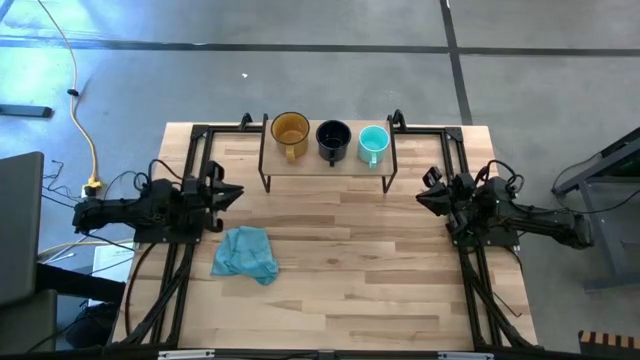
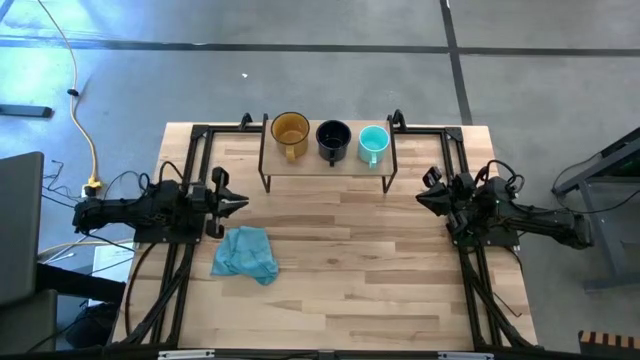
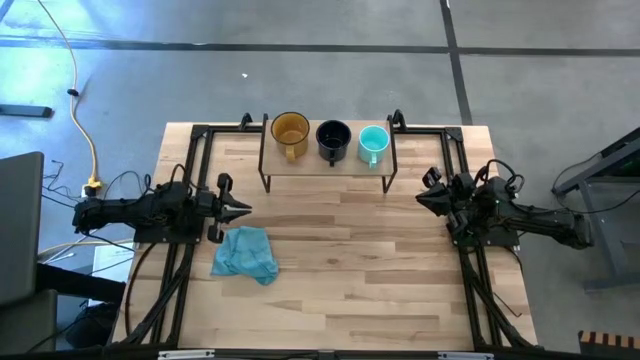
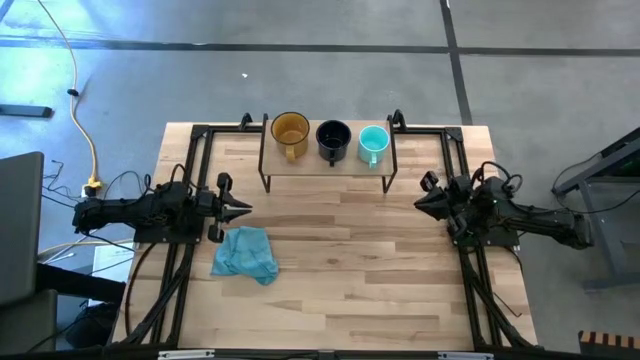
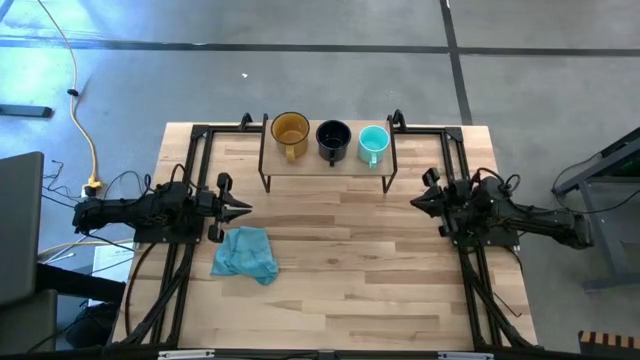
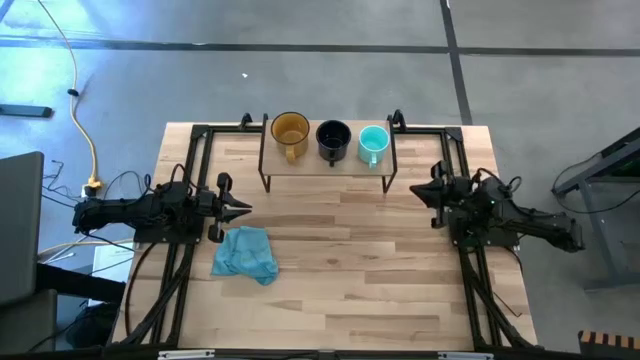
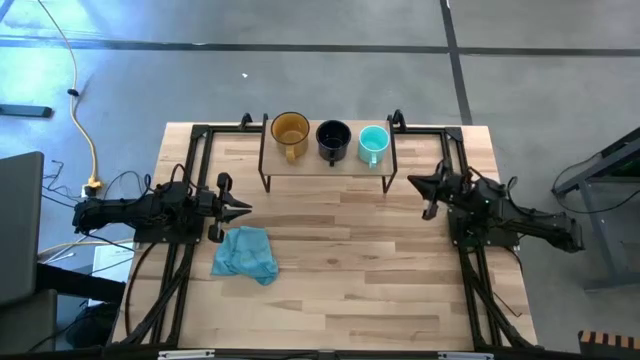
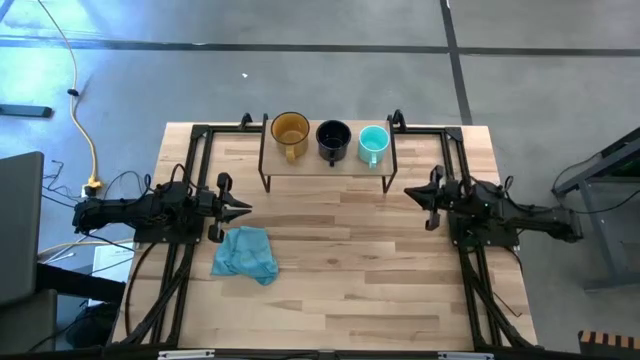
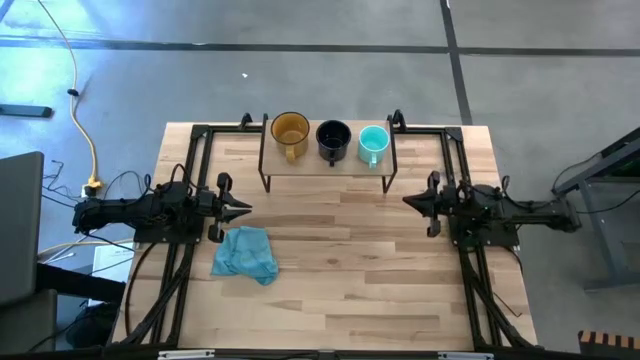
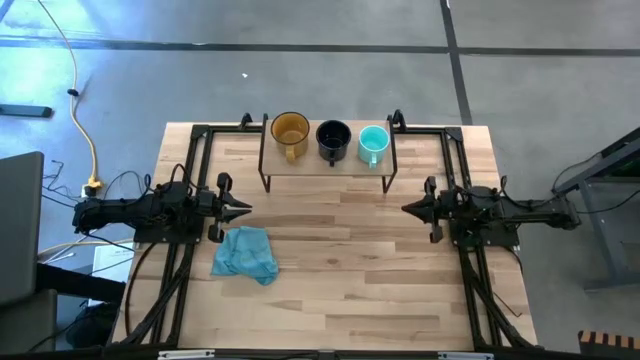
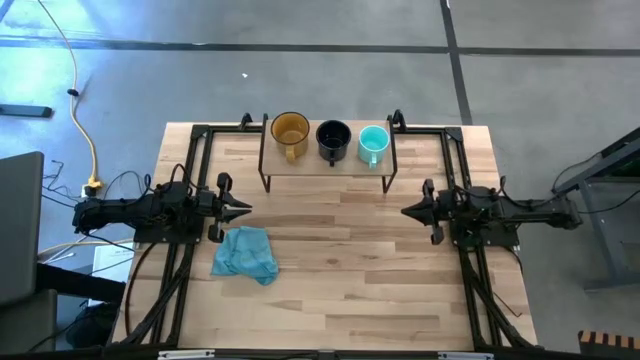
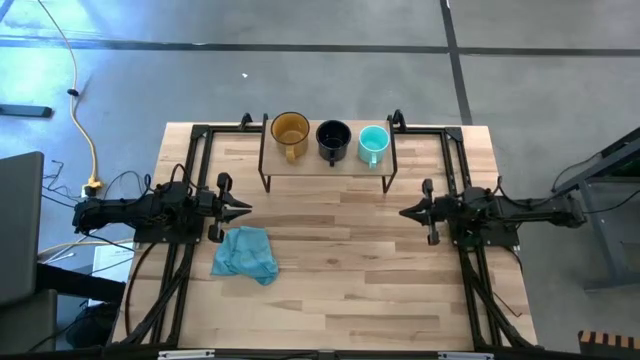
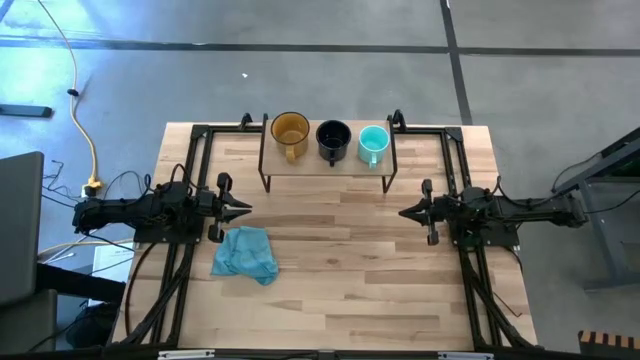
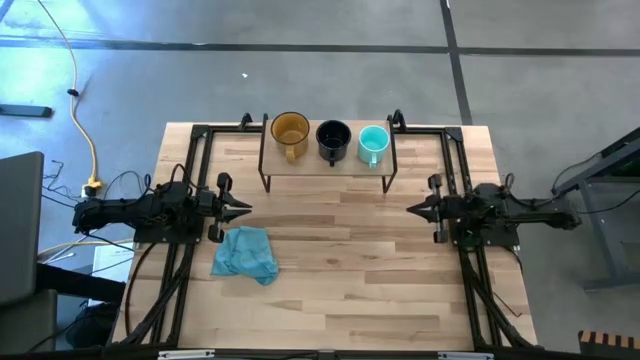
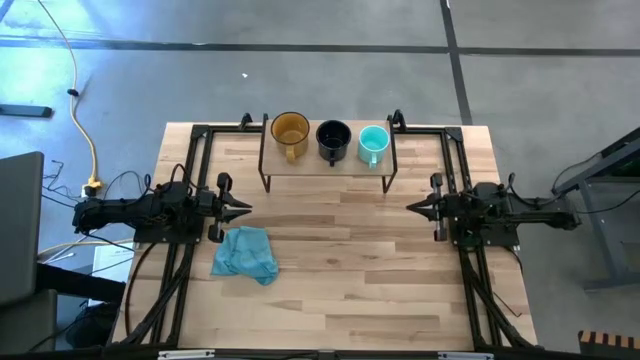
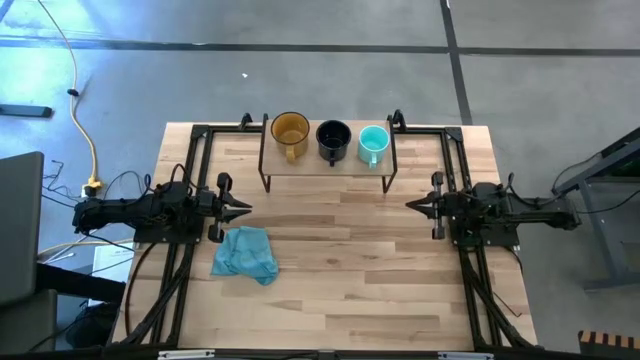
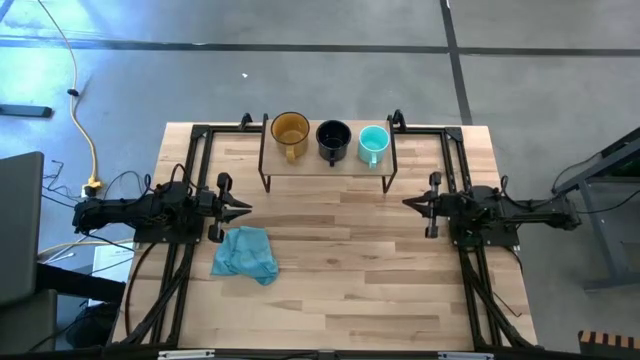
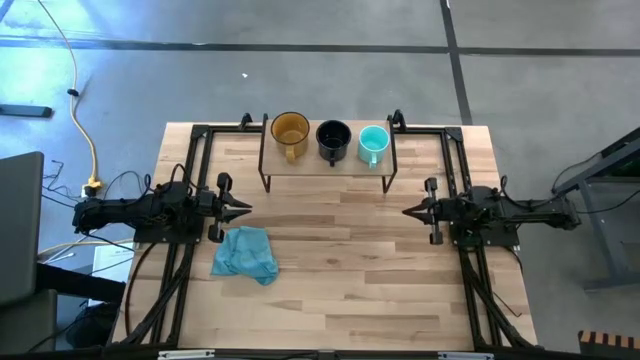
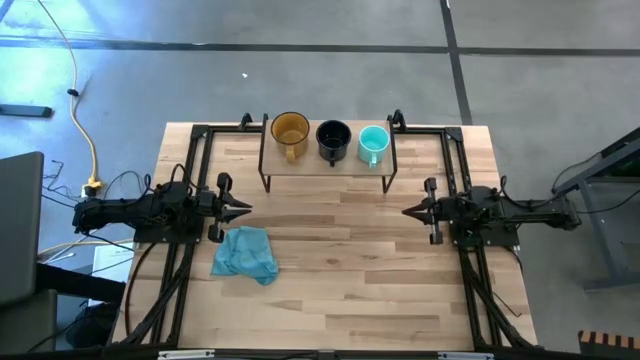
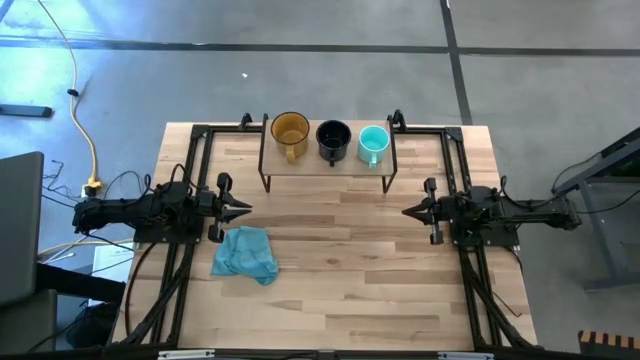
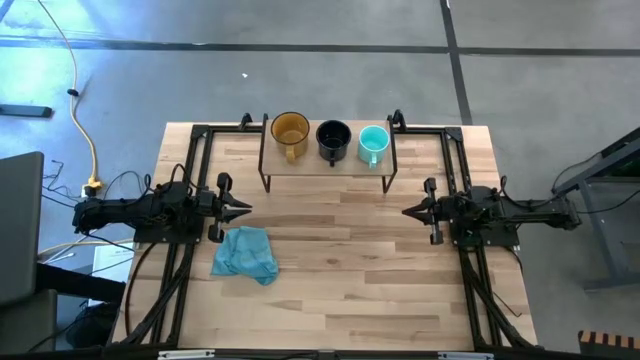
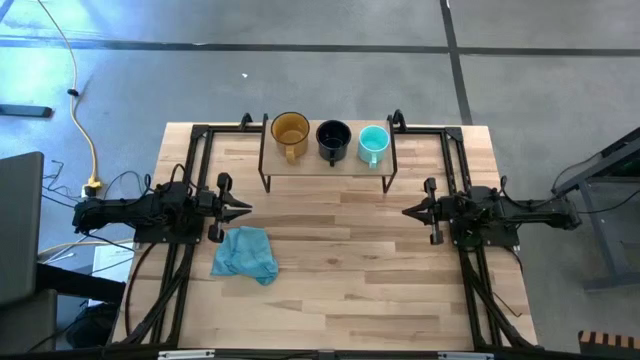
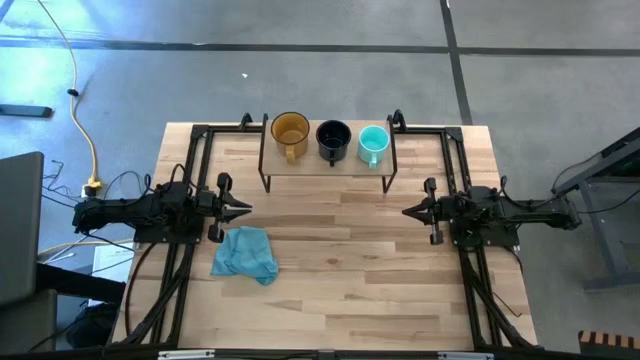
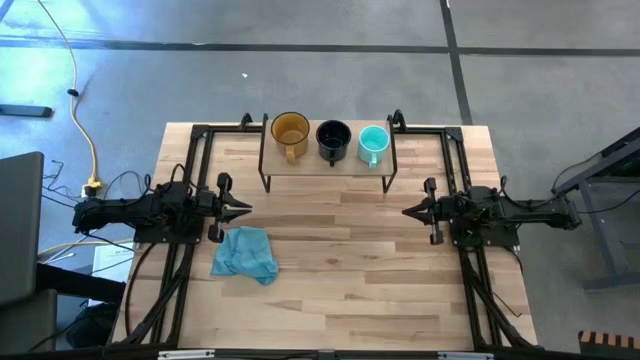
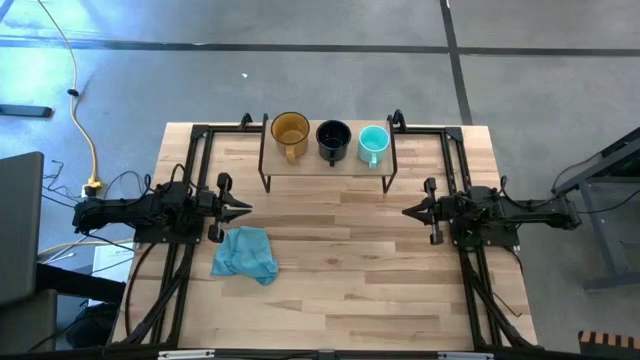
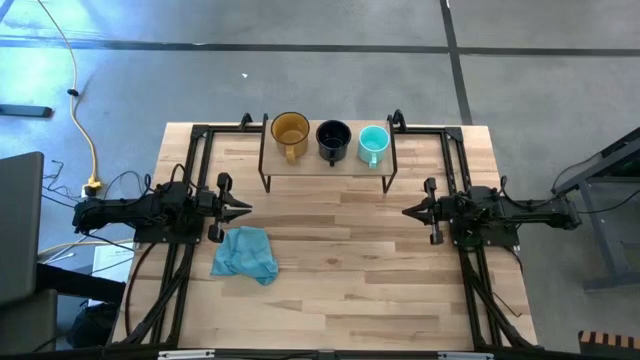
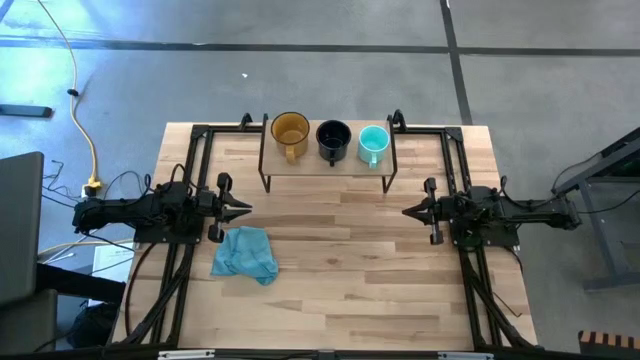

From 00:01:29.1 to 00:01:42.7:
Task: Stack small to large cups/mugs on shelf
Return to Home Position

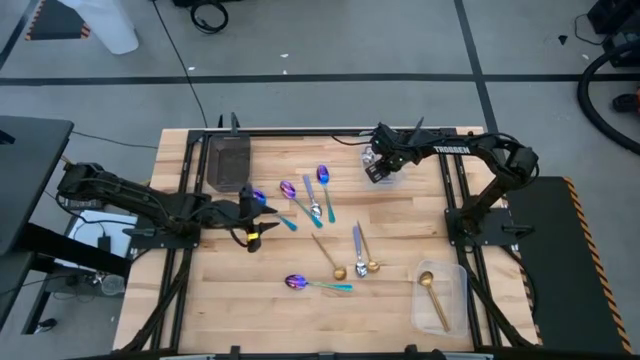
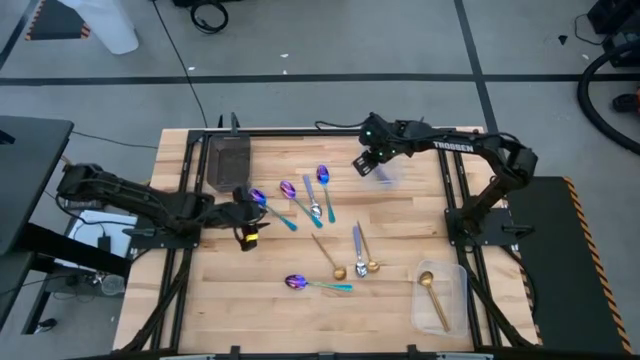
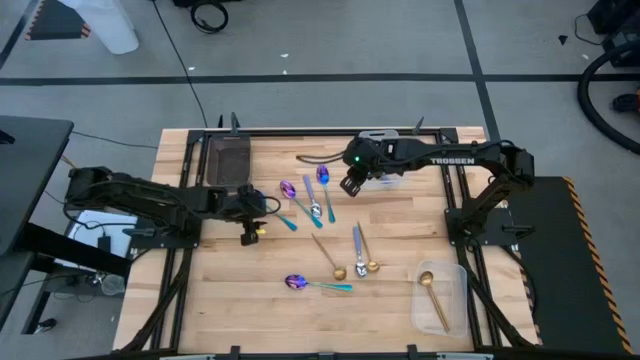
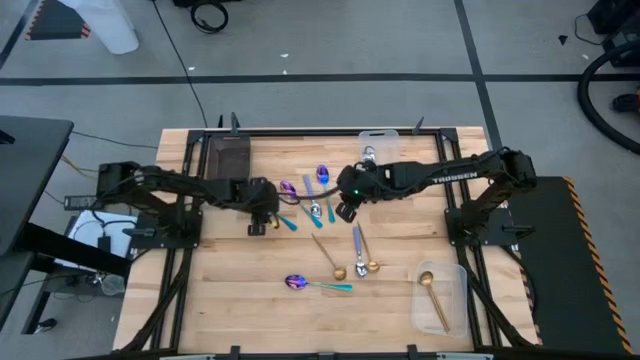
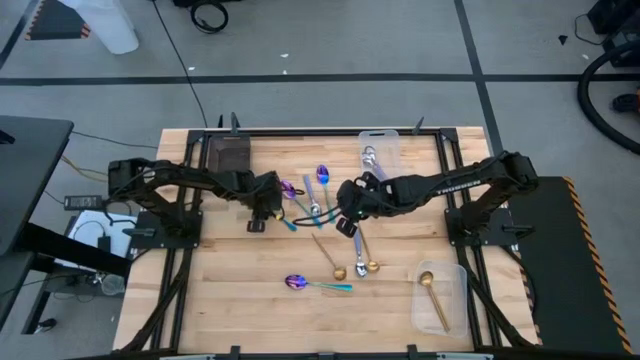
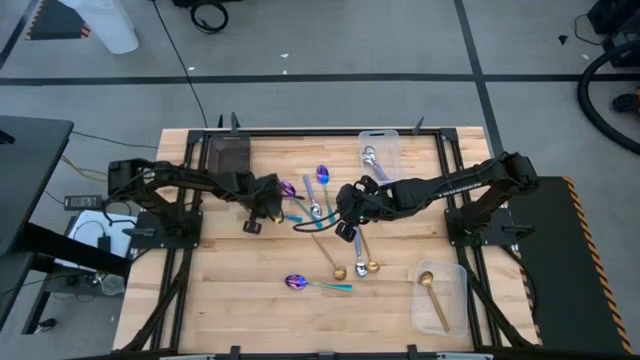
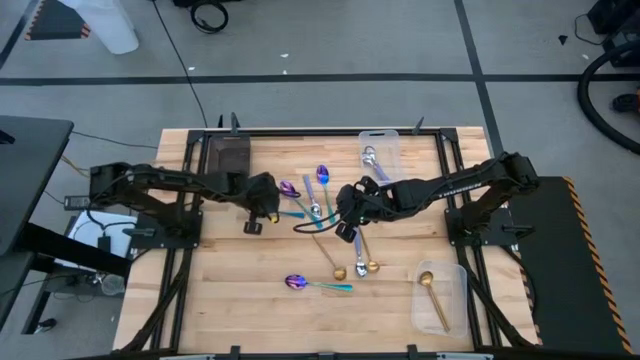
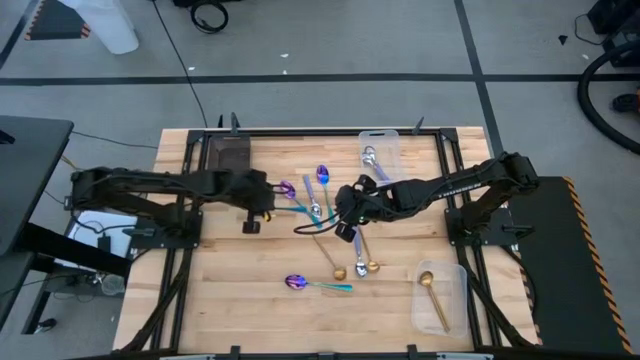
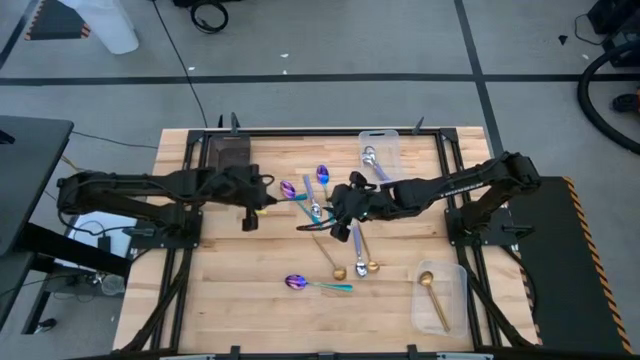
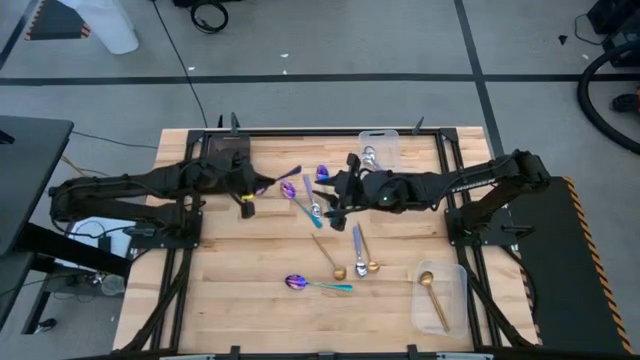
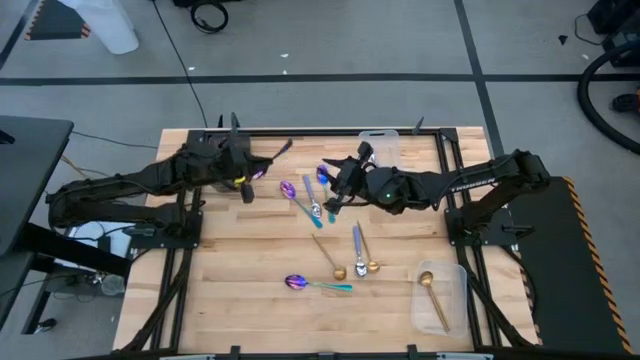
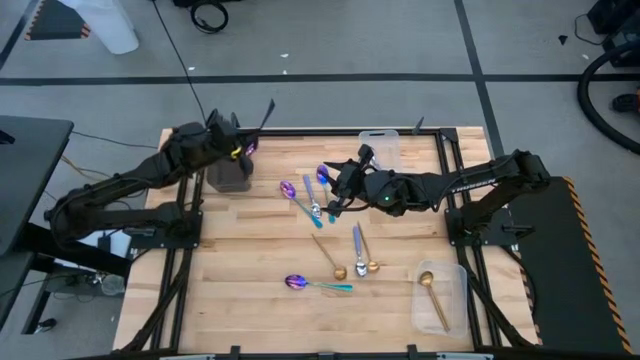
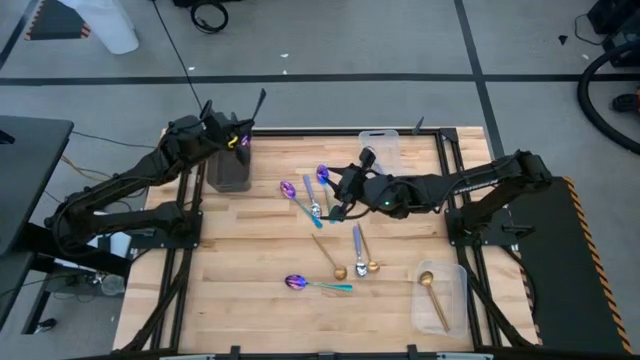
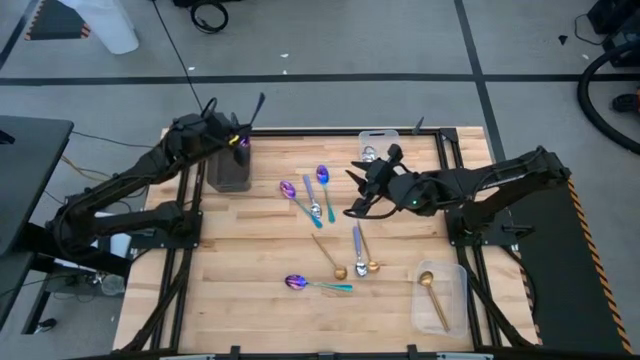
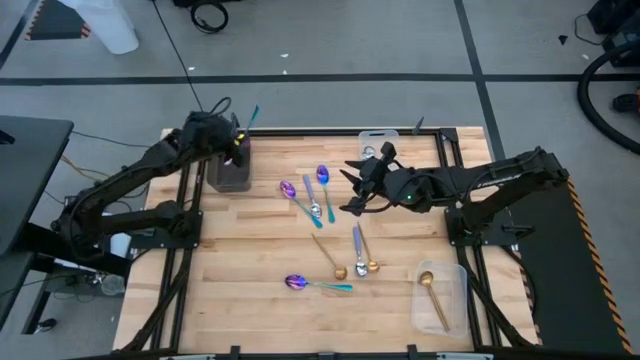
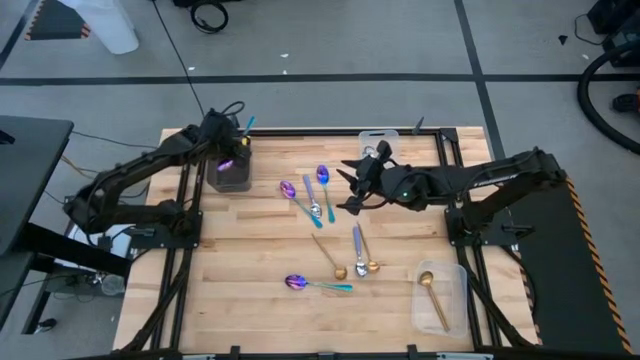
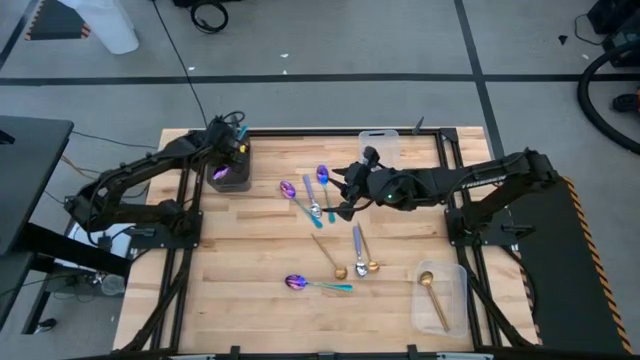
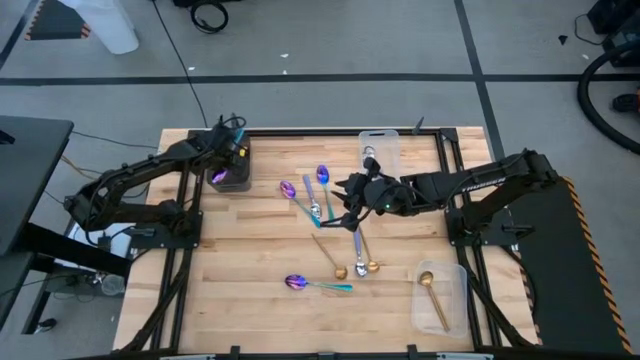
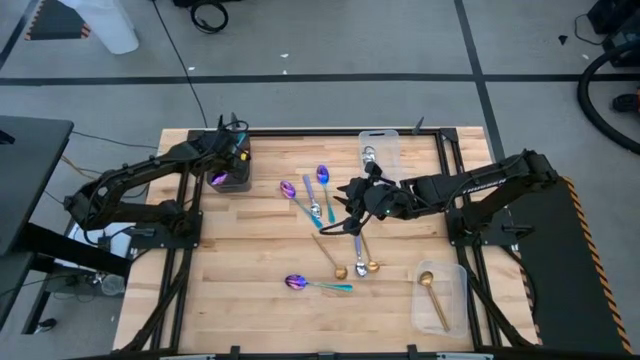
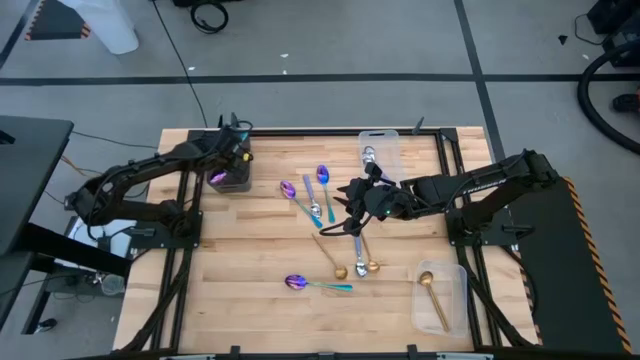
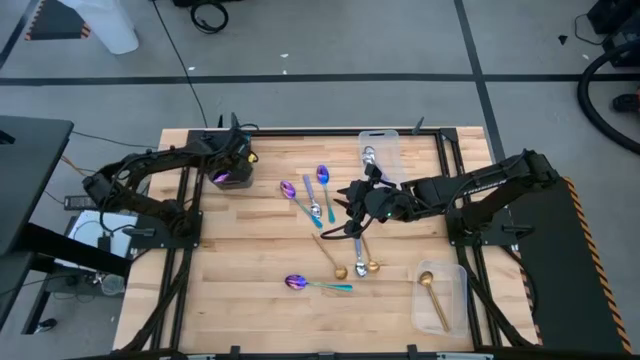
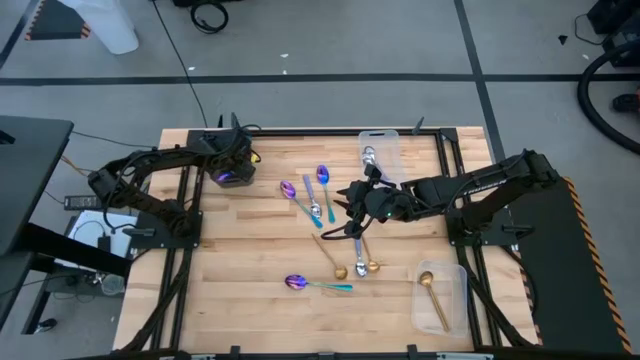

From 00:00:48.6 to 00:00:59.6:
Task: Sort silverware by color (type)
Put the blue spoon into the black bin
